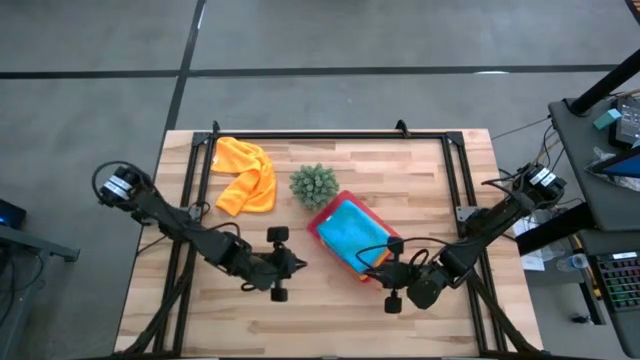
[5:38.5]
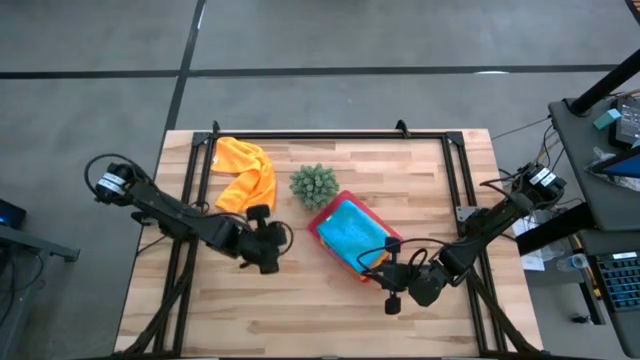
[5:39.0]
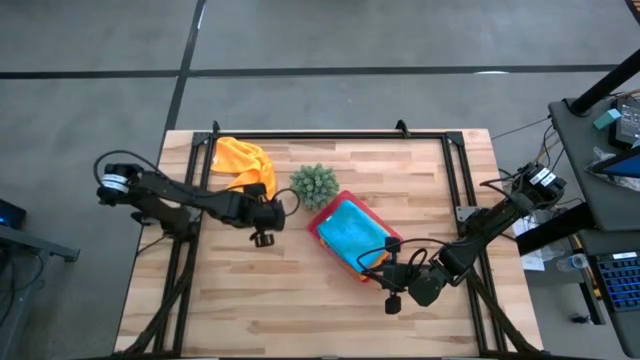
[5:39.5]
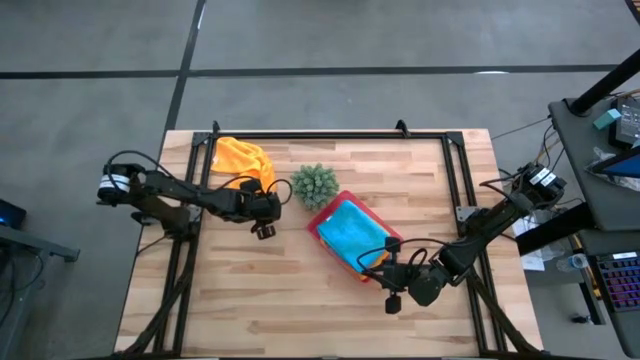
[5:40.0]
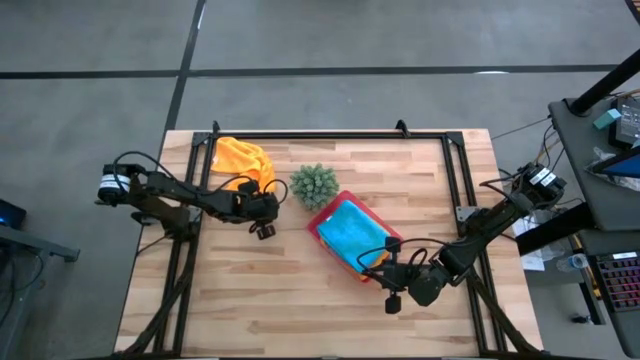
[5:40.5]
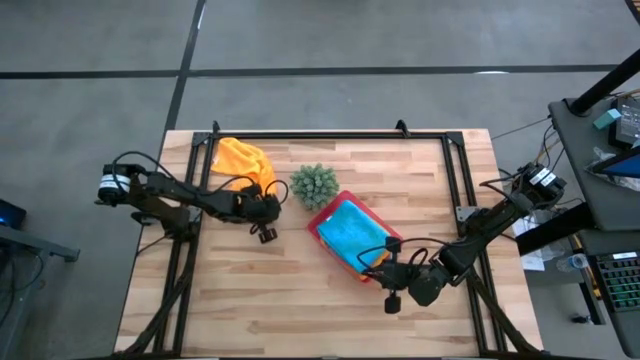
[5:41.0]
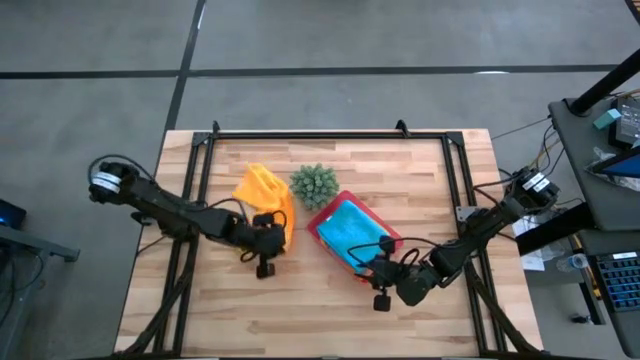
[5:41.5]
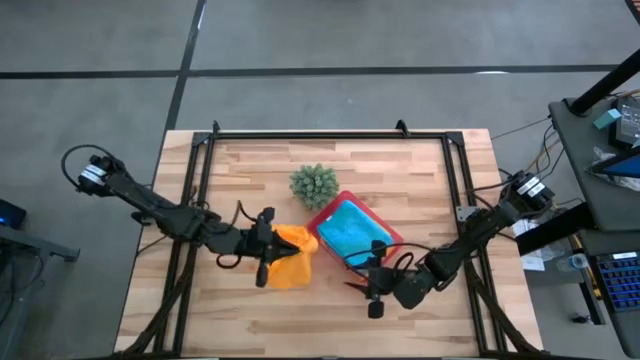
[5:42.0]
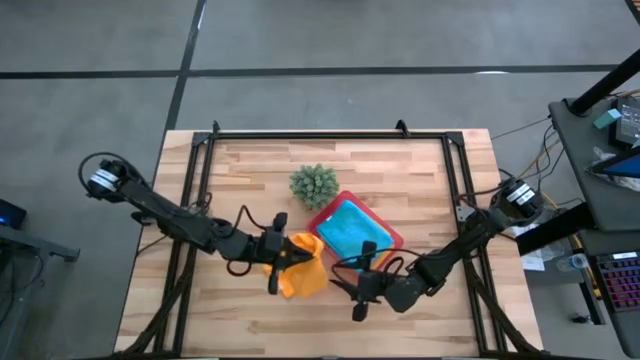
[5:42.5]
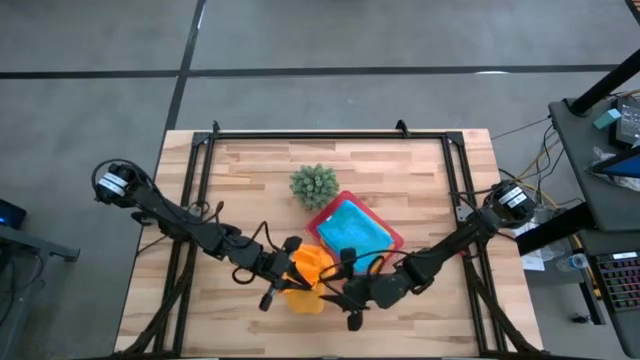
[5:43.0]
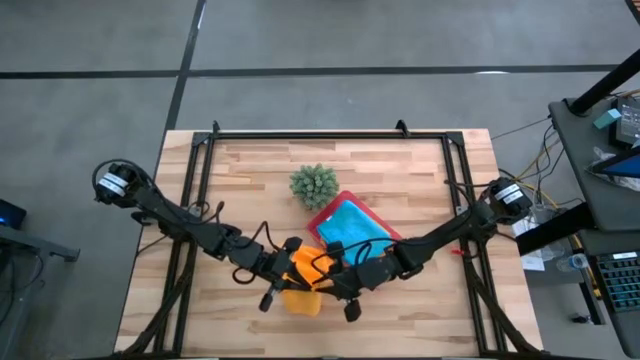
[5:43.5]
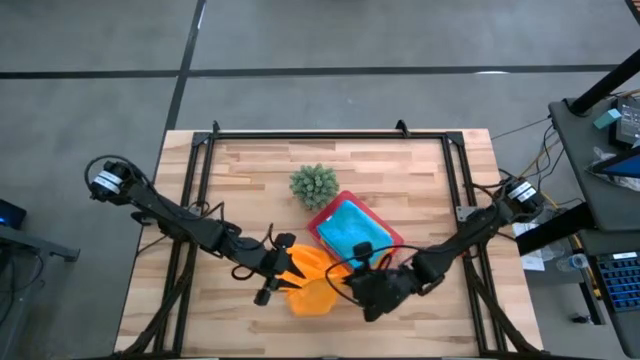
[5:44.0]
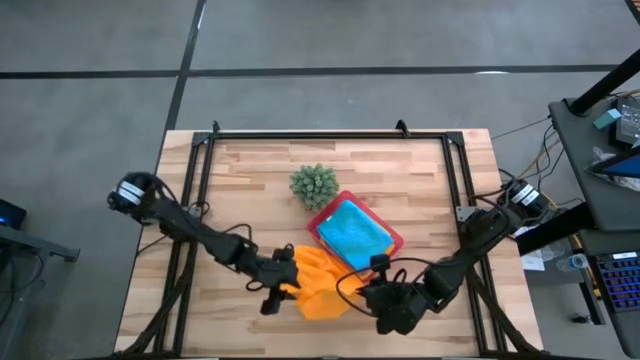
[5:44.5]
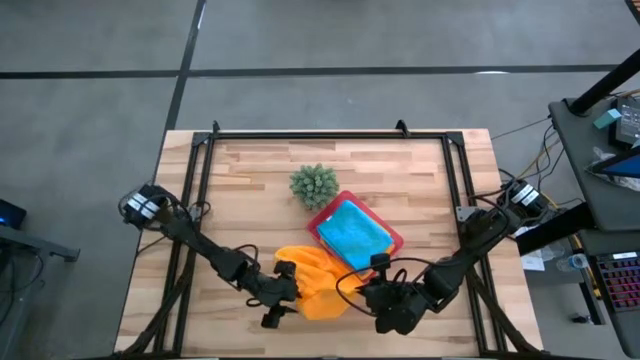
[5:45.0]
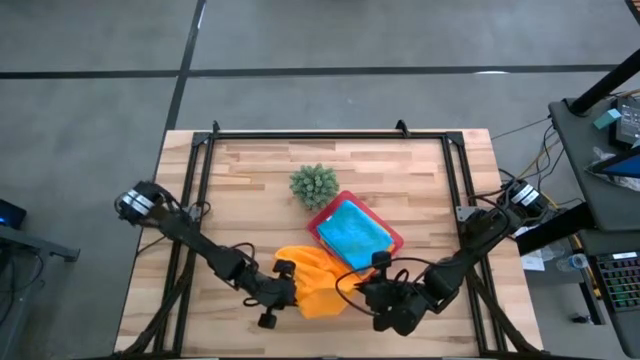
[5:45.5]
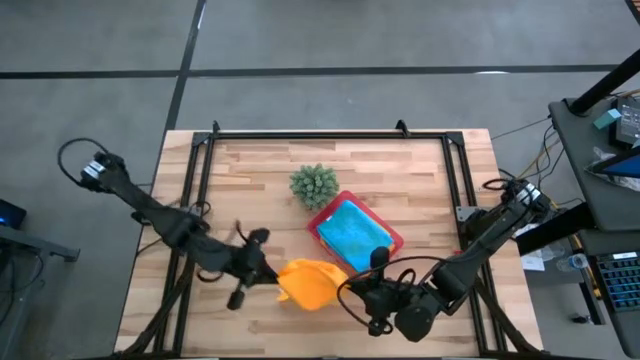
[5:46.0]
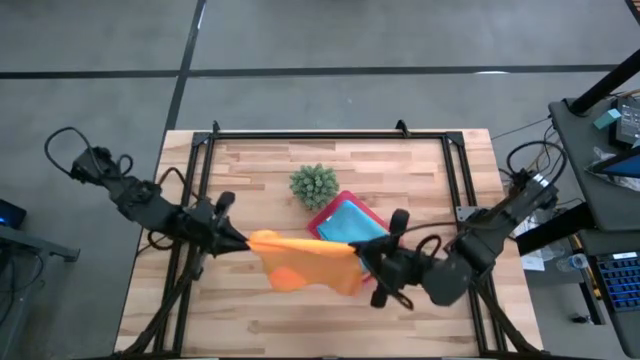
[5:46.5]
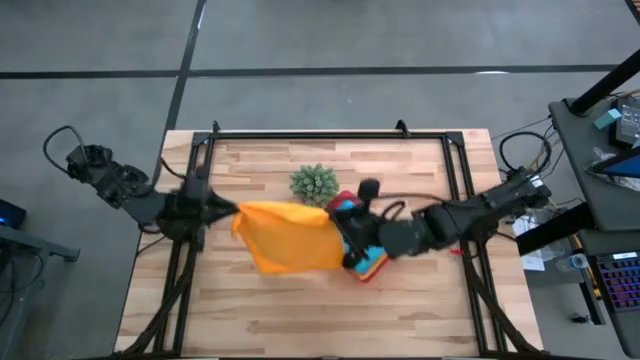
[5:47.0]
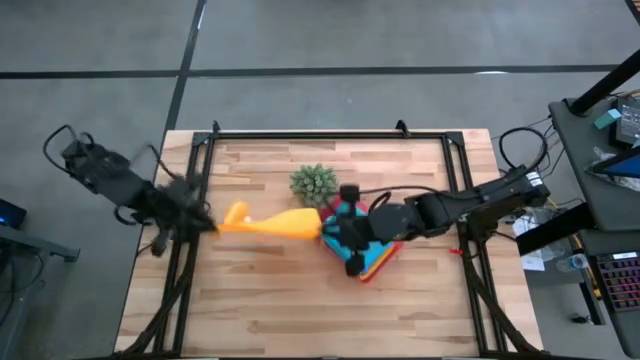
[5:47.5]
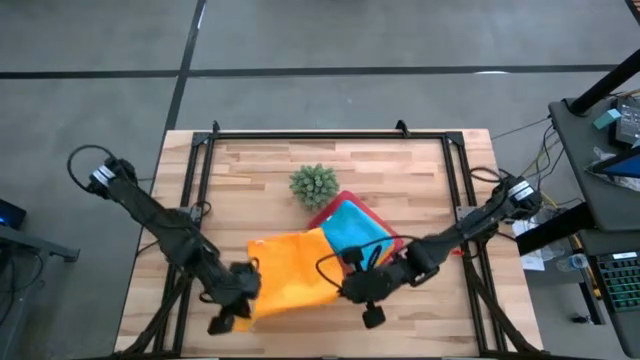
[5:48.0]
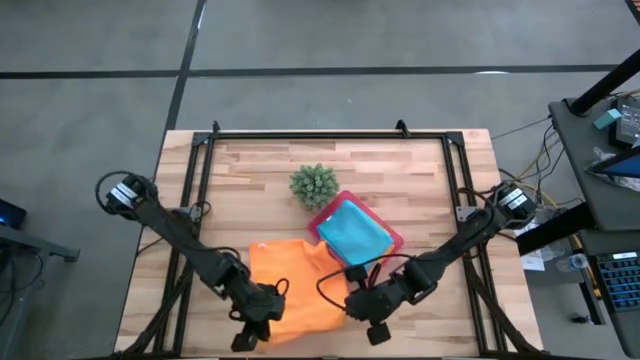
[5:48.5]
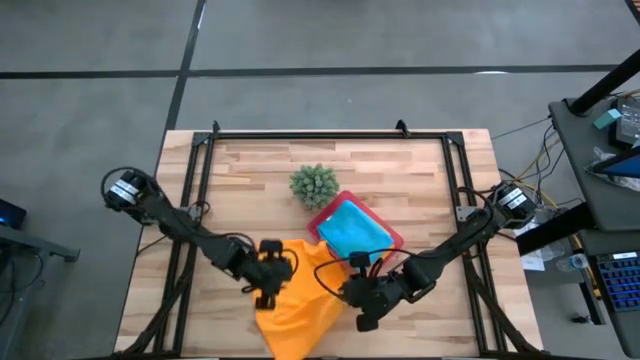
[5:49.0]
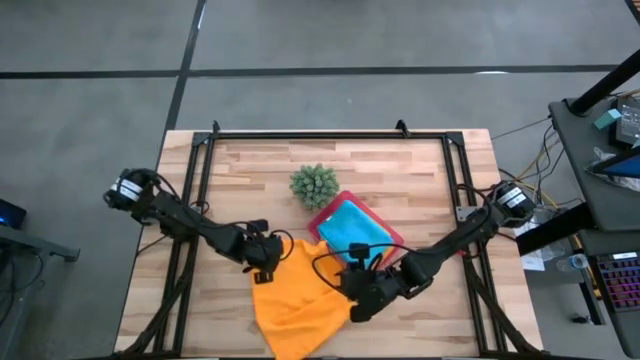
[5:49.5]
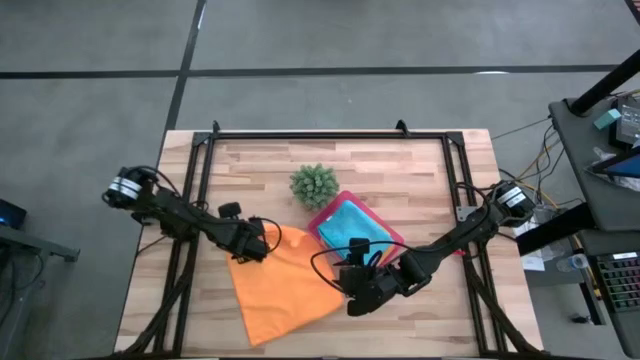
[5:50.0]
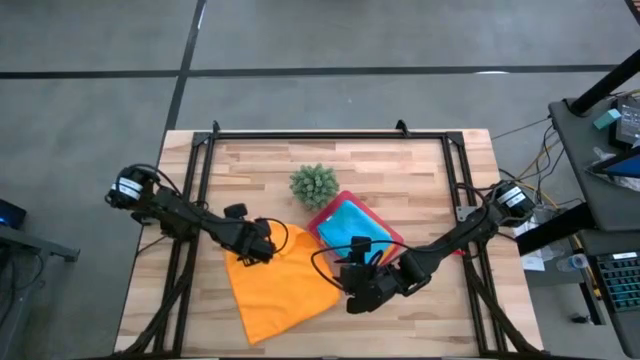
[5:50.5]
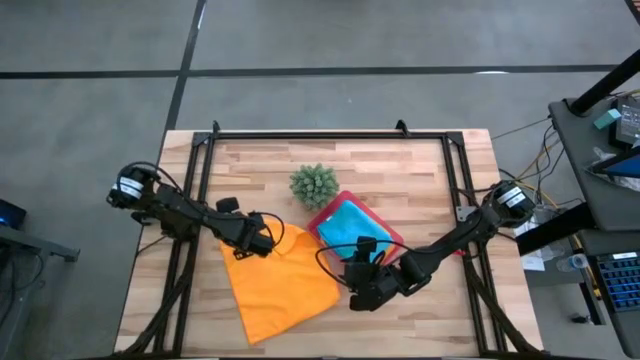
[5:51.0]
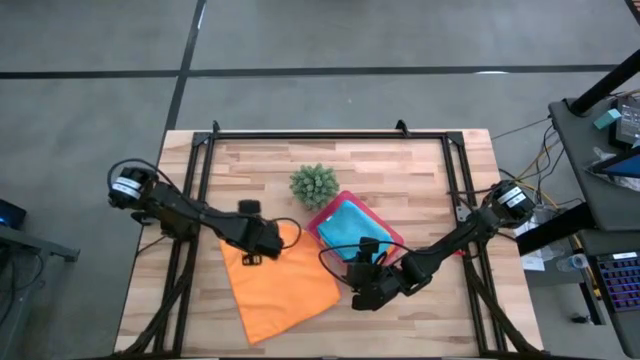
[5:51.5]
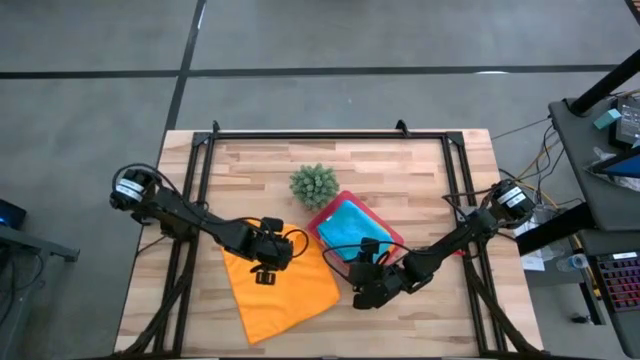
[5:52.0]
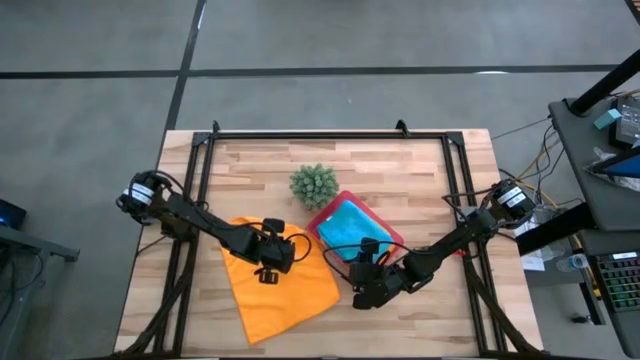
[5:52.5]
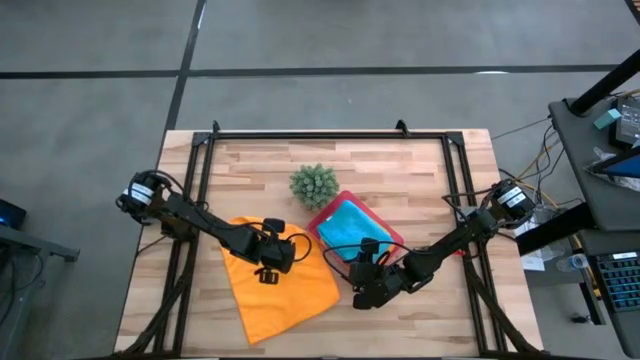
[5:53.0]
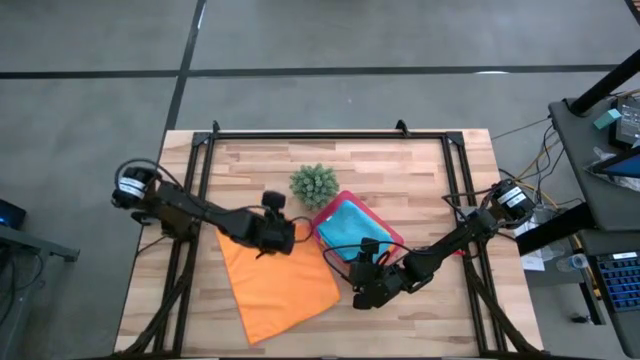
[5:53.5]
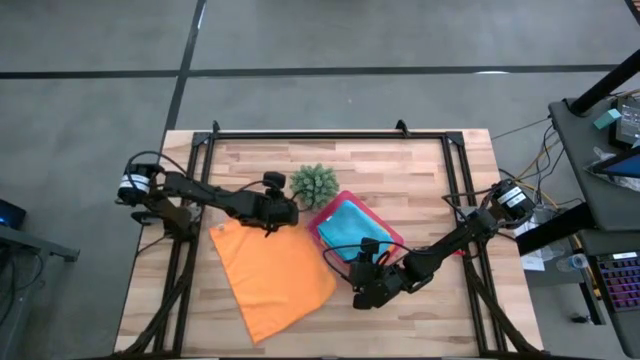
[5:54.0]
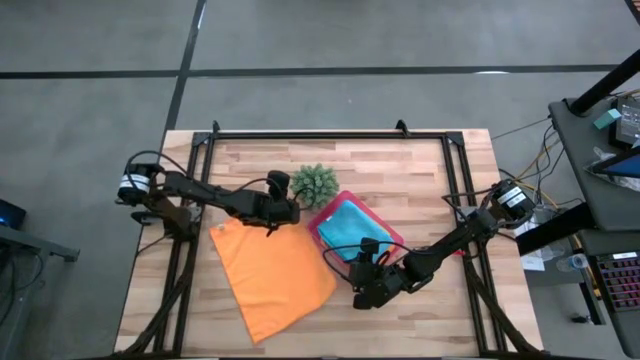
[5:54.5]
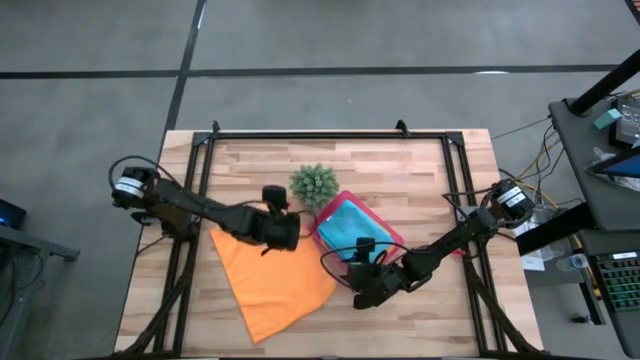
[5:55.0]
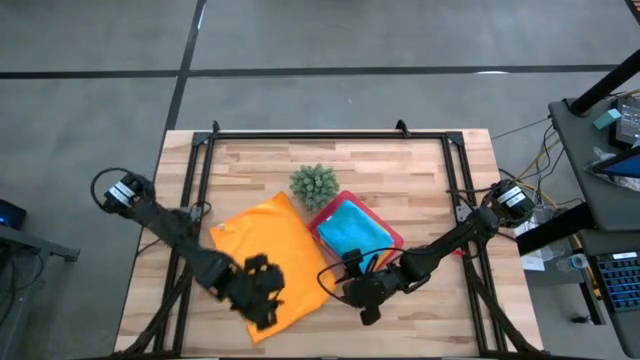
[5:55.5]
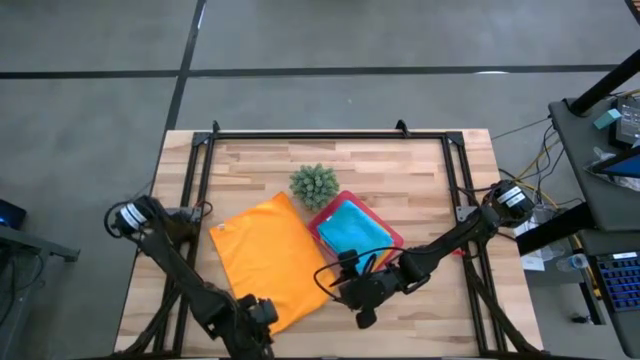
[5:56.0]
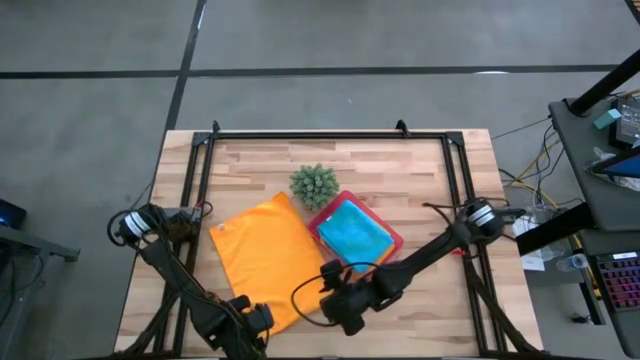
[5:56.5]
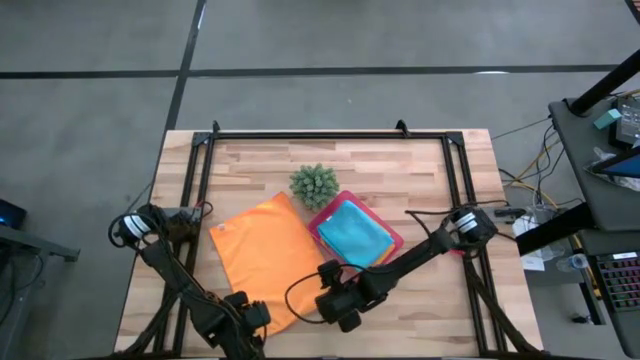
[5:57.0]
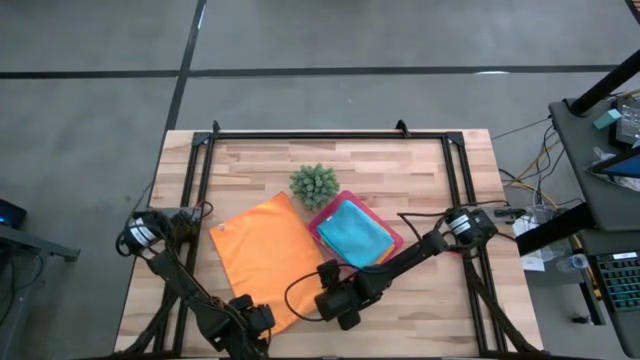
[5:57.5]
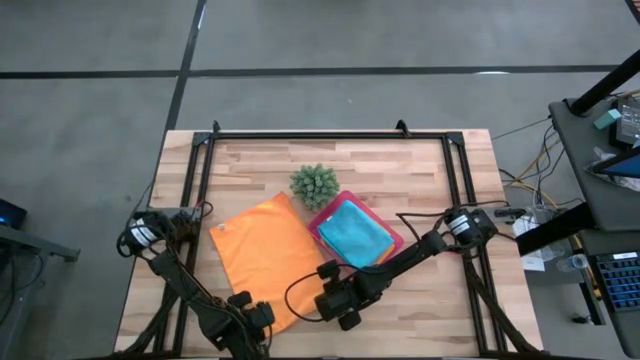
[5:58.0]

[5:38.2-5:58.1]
Task: Fold microfiber towels
Fold the orange microfiber cloth
